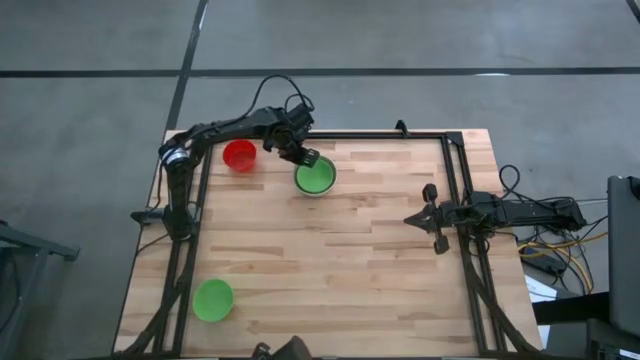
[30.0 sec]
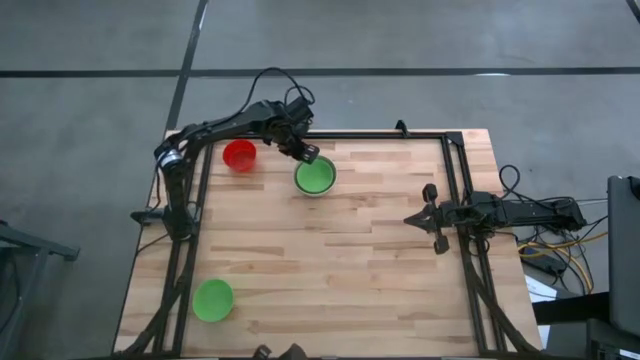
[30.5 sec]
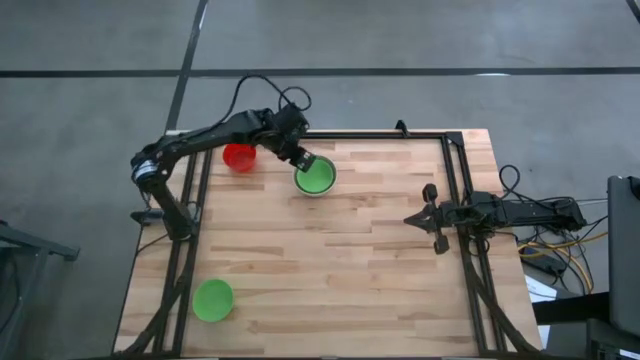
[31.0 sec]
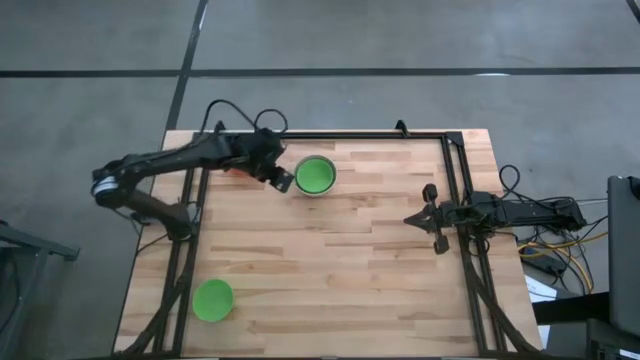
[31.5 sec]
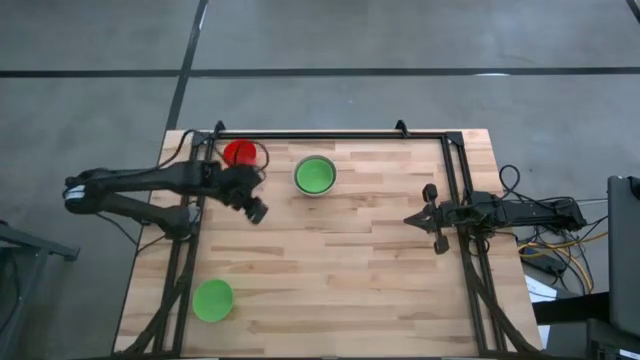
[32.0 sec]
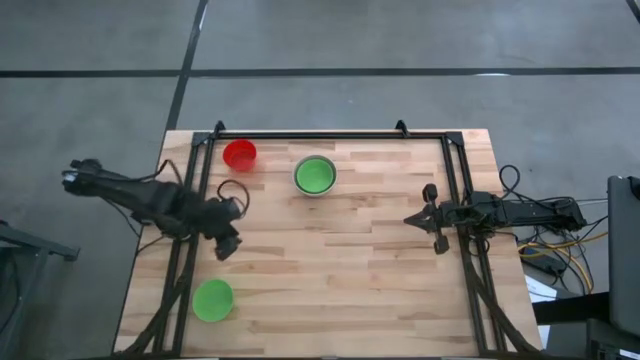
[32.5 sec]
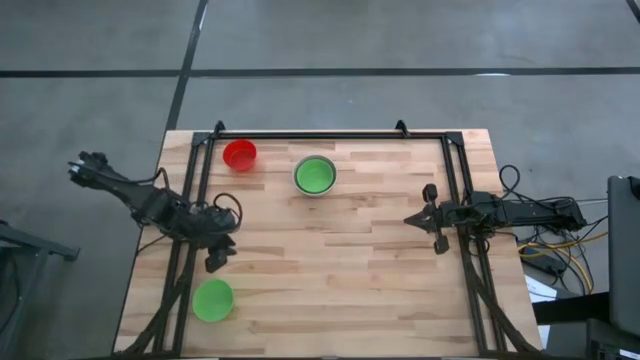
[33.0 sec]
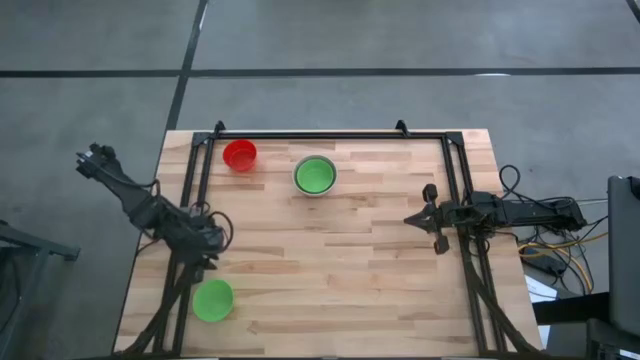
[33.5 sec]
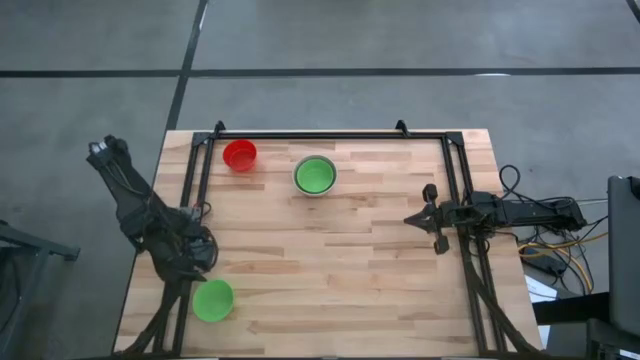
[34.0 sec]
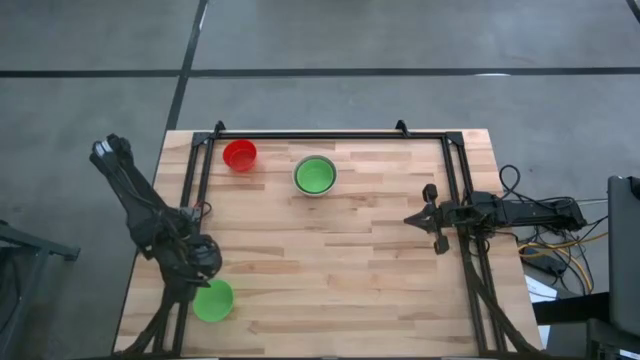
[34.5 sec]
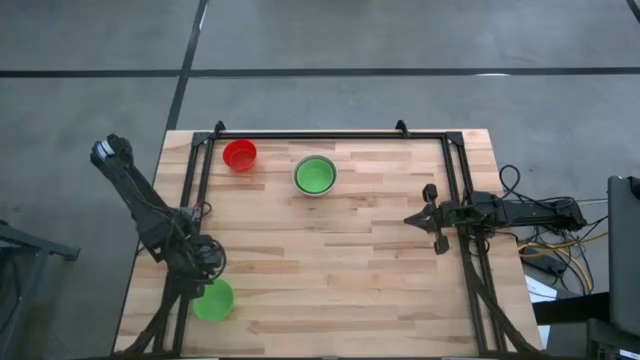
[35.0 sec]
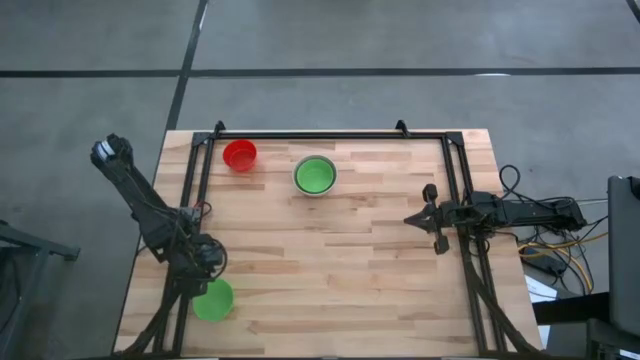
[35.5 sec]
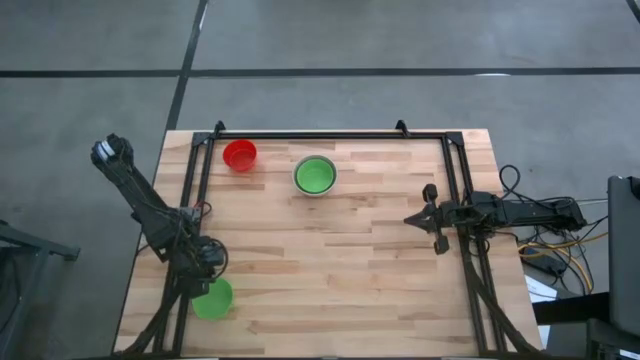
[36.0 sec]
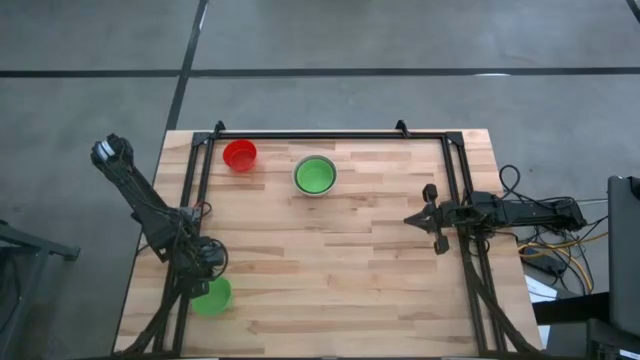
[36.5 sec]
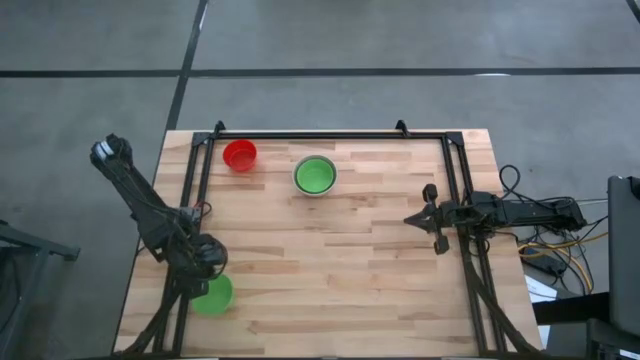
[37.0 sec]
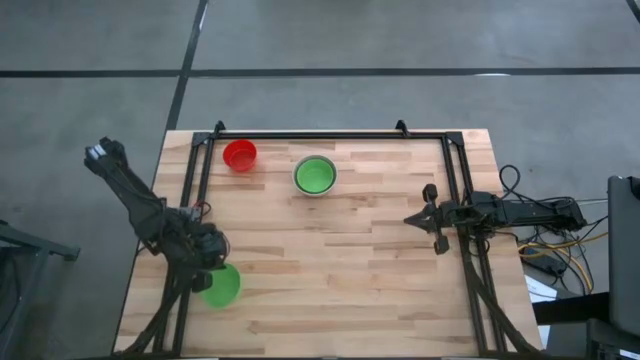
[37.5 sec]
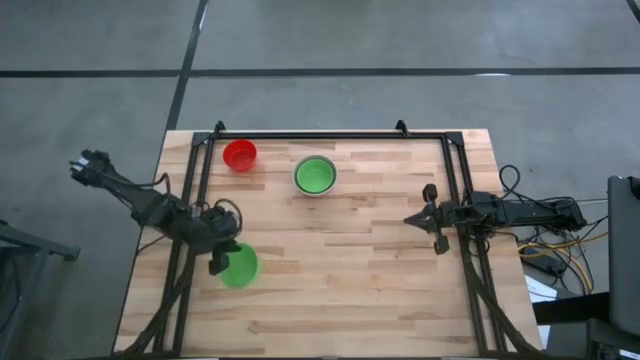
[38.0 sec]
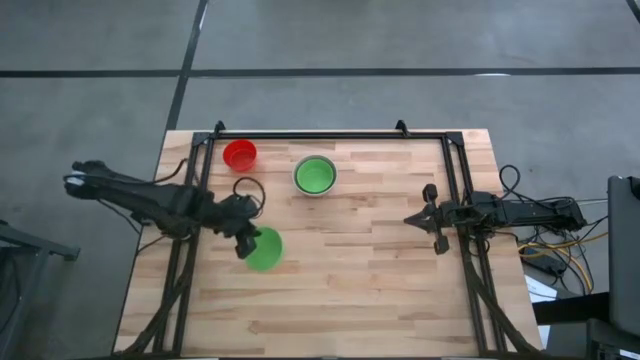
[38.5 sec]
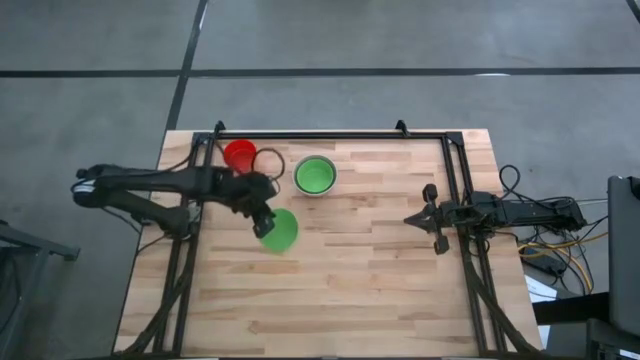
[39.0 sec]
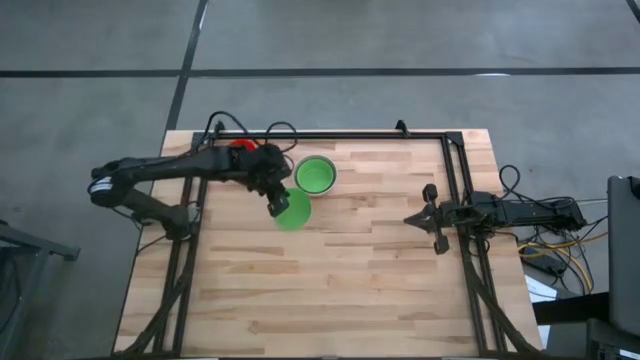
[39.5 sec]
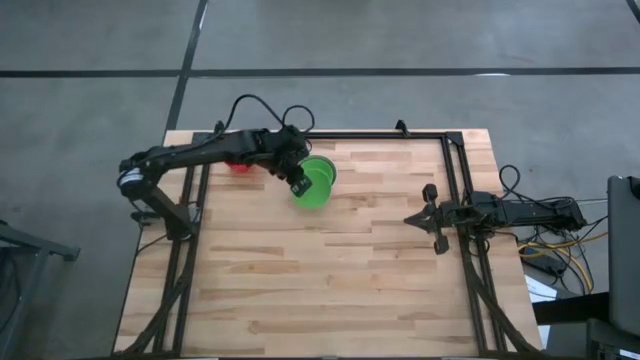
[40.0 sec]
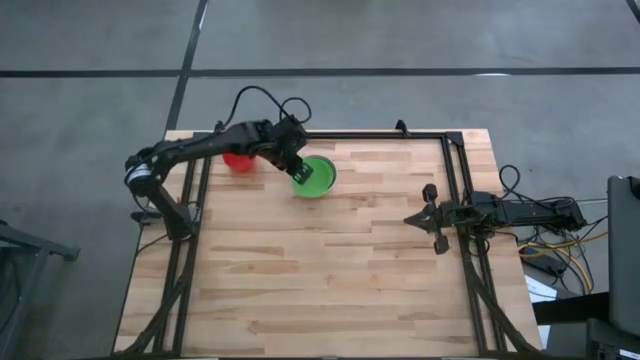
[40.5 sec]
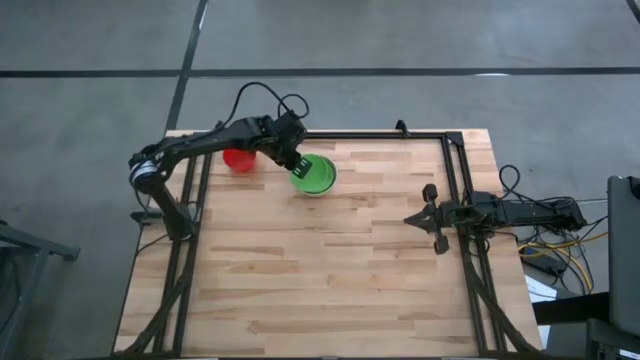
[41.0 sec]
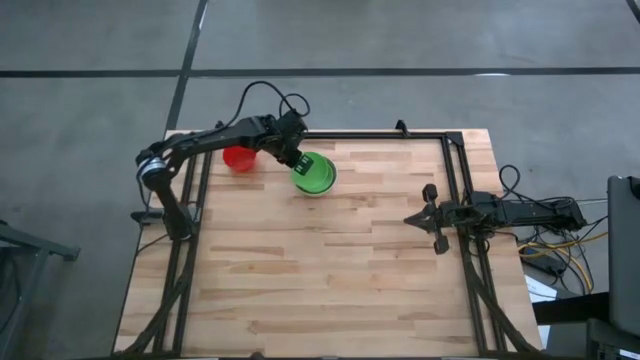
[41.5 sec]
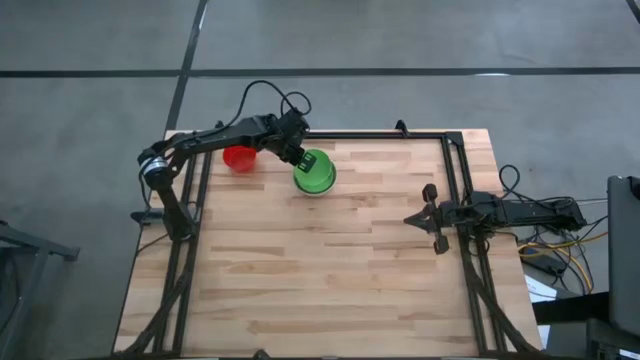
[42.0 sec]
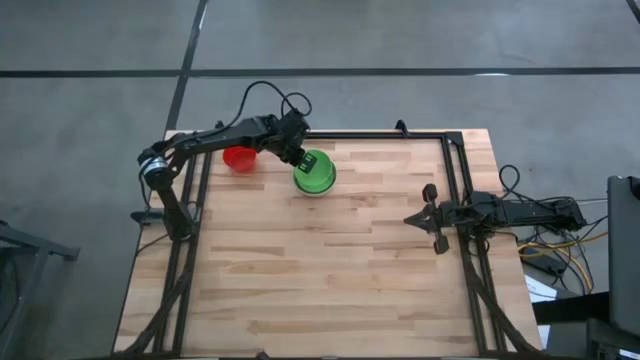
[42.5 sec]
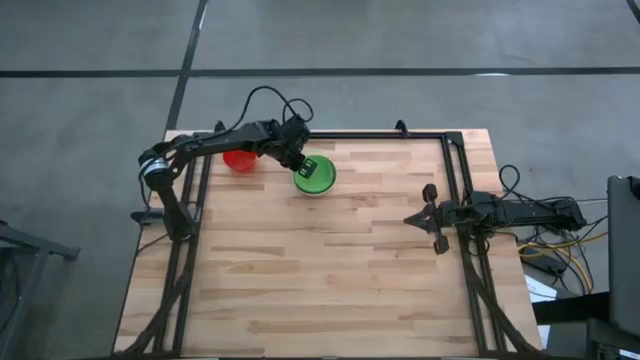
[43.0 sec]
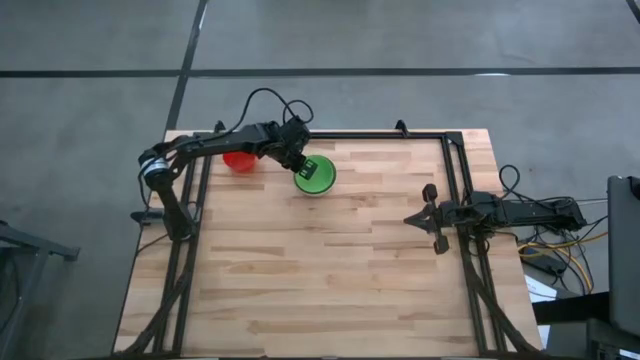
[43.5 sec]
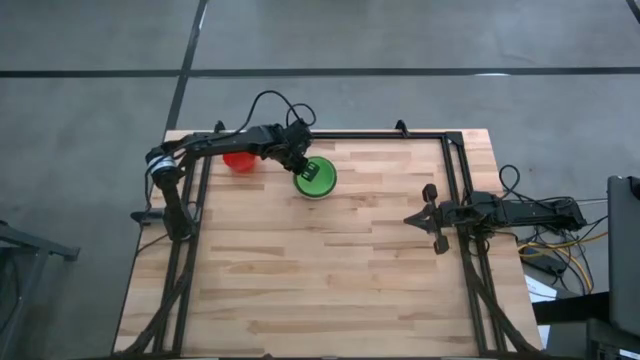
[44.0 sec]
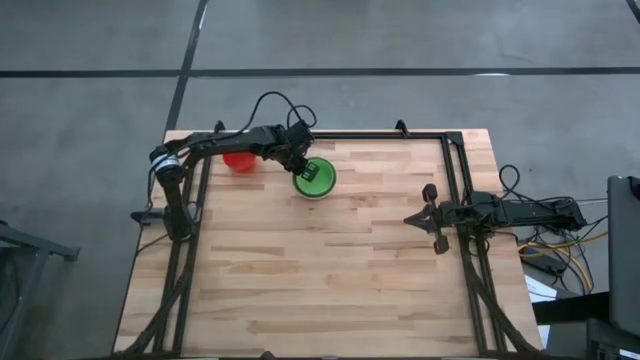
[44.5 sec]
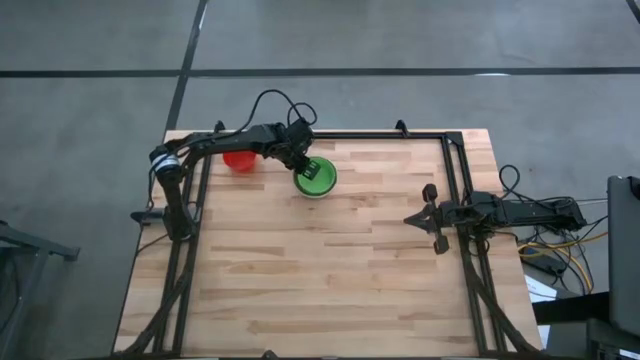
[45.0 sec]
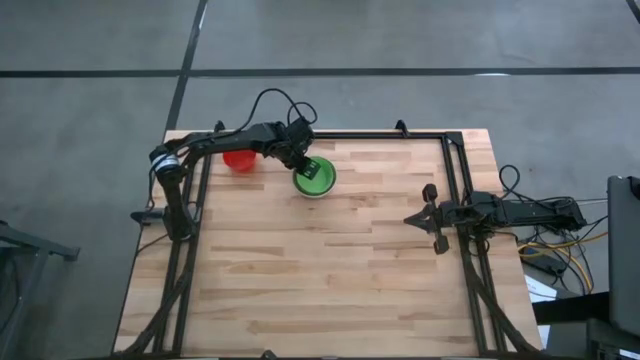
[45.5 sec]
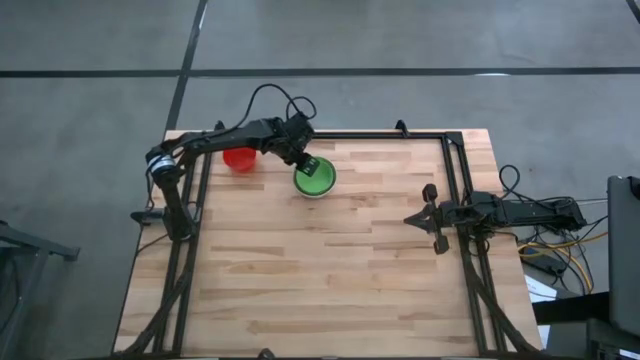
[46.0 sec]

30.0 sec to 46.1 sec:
Stack the bottom green bowl on the top green bowl

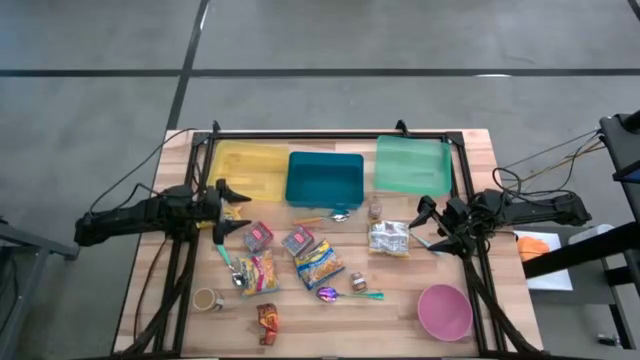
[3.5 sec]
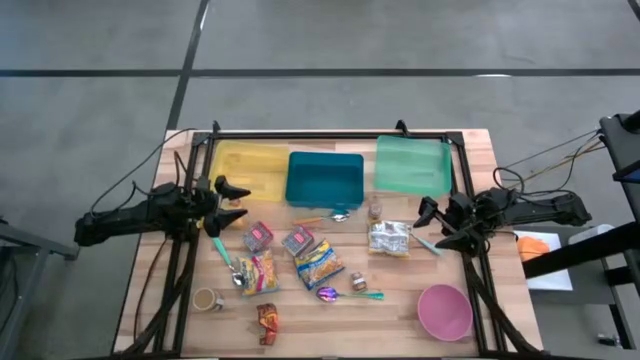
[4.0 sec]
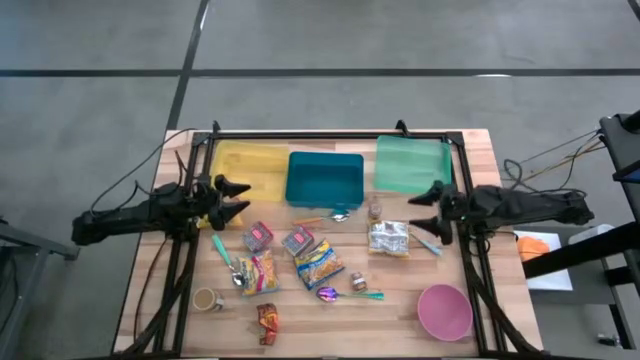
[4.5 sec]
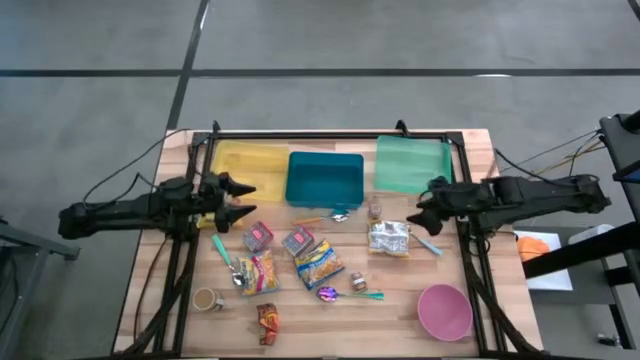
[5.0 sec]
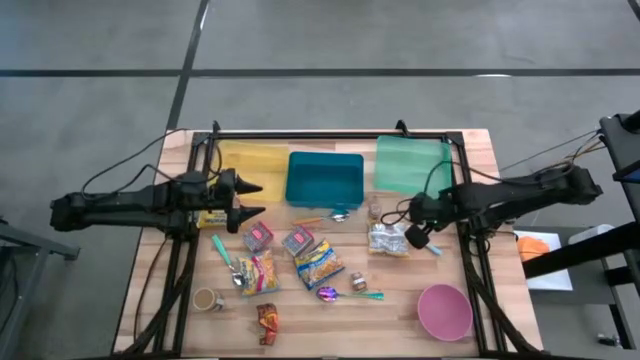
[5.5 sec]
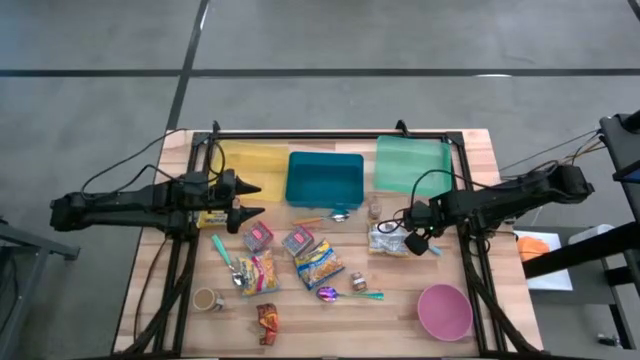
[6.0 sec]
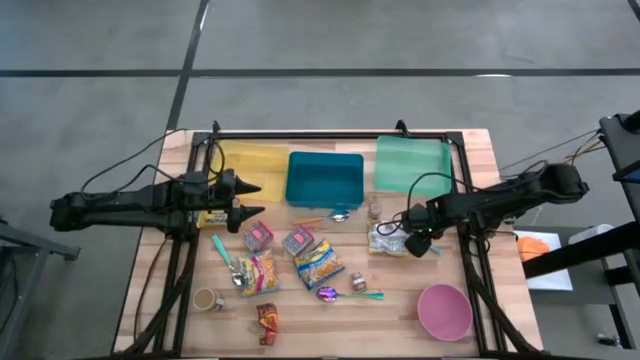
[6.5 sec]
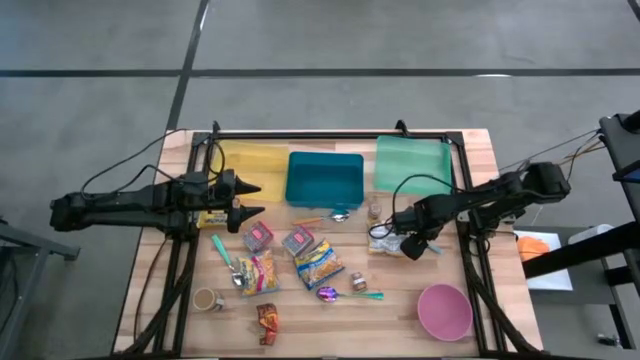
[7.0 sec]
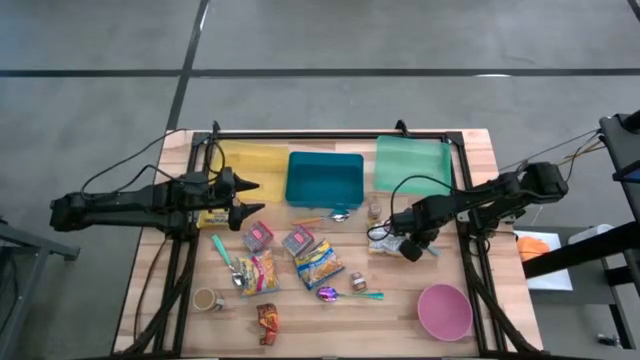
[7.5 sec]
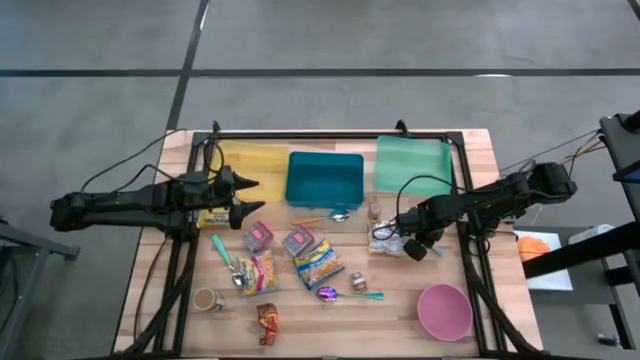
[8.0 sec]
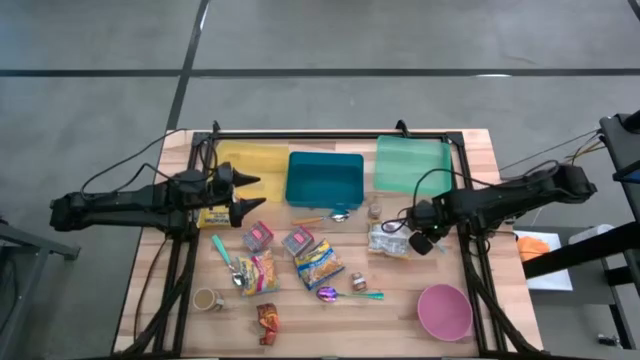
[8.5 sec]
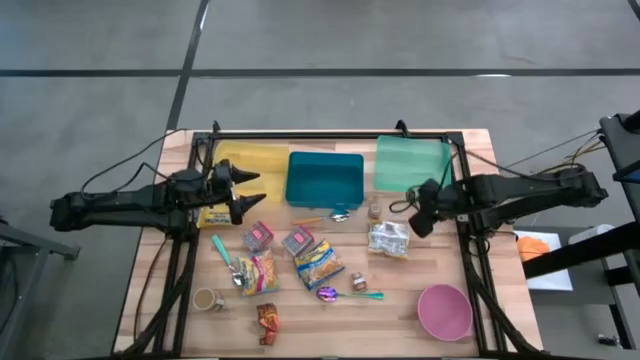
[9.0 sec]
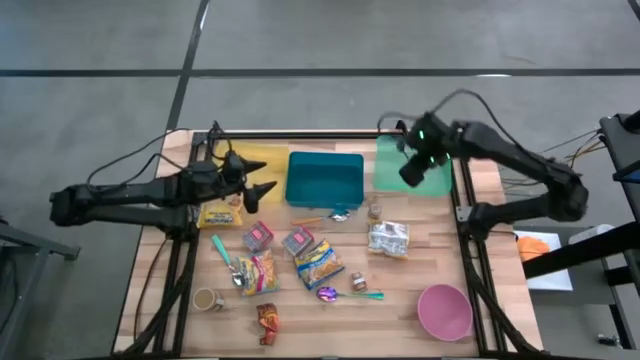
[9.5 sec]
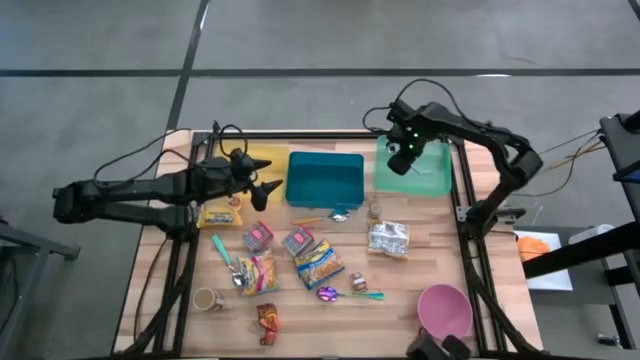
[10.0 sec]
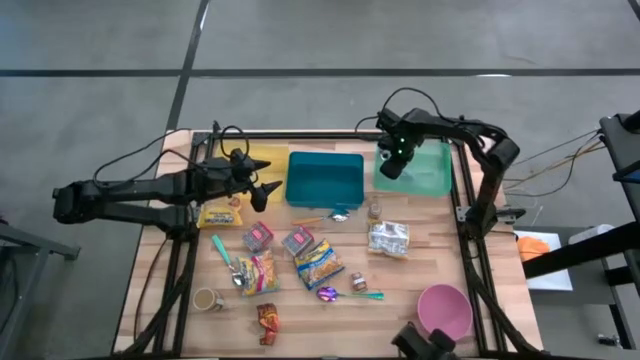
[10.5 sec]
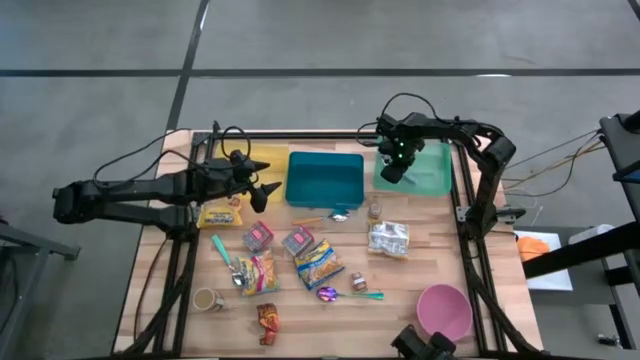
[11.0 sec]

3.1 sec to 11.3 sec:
Put the light blue spoon into the green bin
